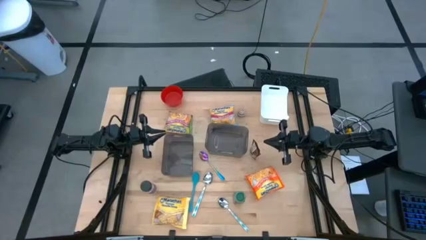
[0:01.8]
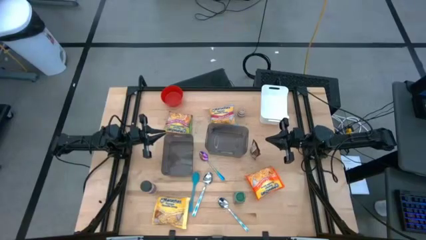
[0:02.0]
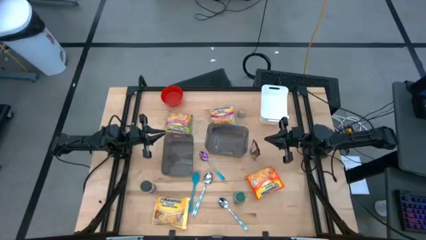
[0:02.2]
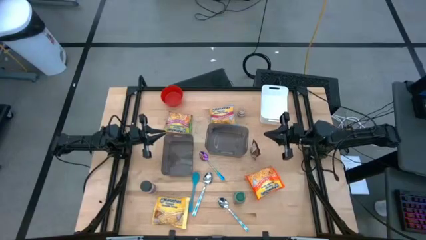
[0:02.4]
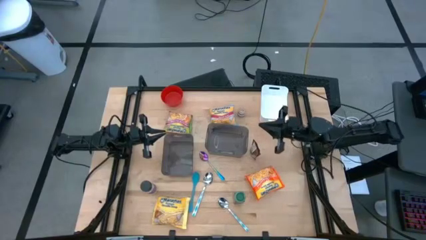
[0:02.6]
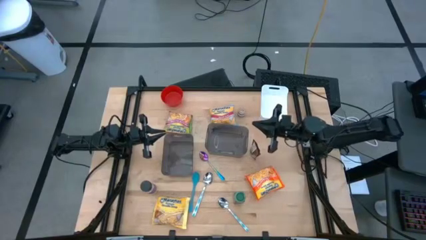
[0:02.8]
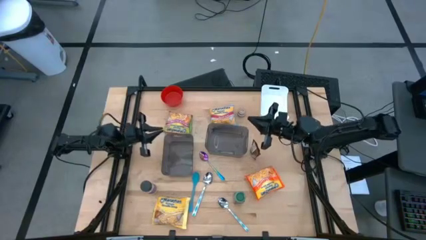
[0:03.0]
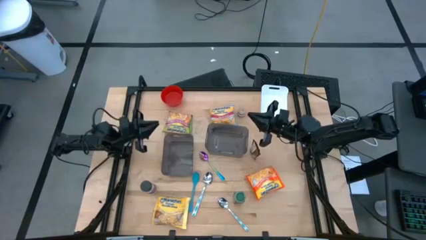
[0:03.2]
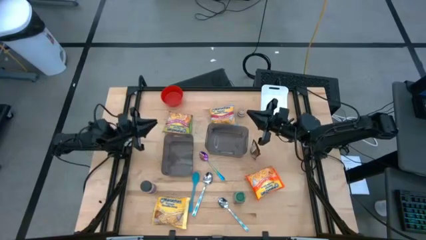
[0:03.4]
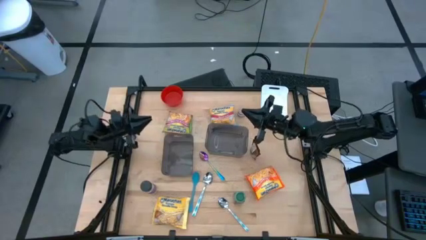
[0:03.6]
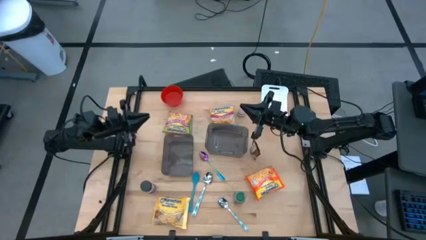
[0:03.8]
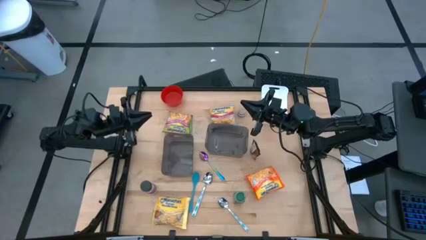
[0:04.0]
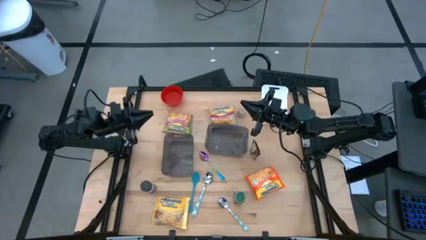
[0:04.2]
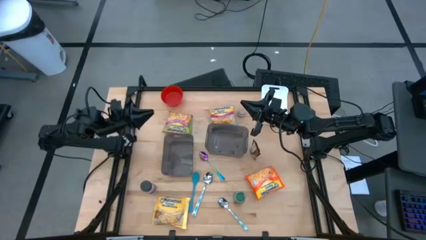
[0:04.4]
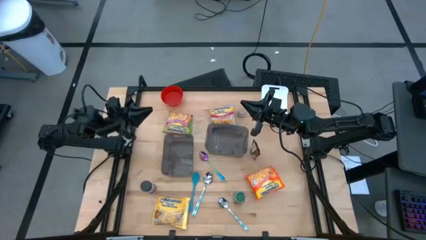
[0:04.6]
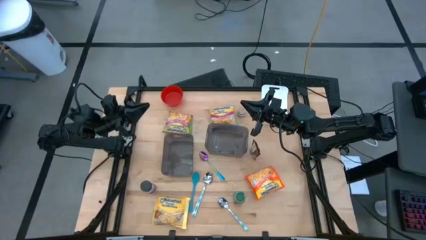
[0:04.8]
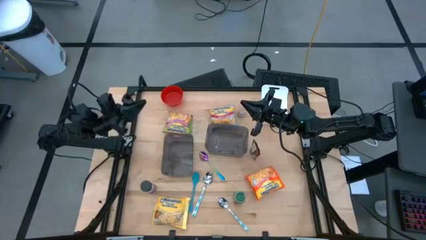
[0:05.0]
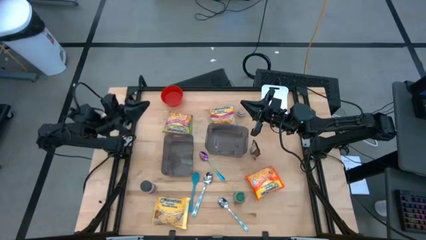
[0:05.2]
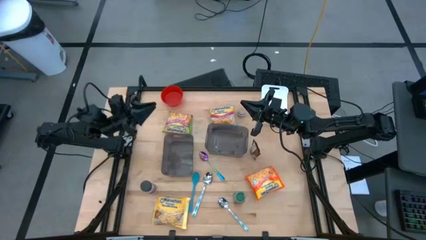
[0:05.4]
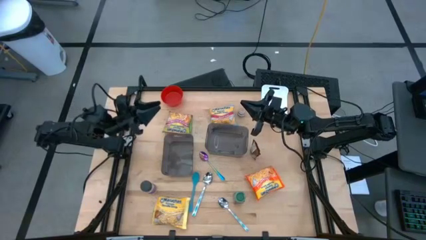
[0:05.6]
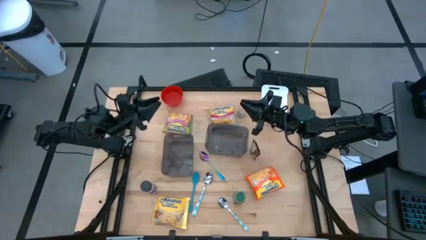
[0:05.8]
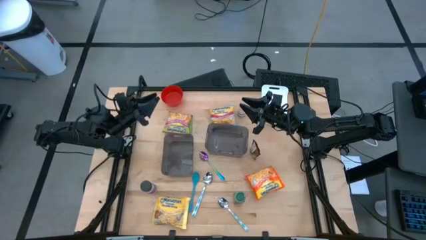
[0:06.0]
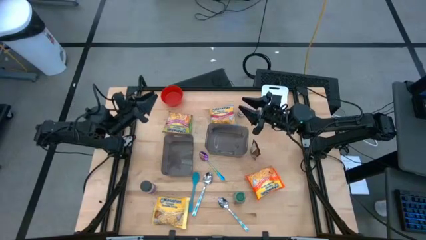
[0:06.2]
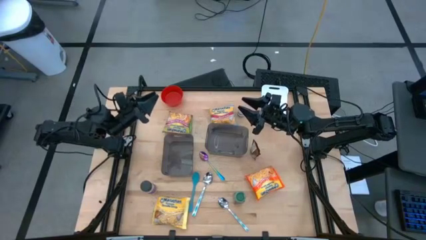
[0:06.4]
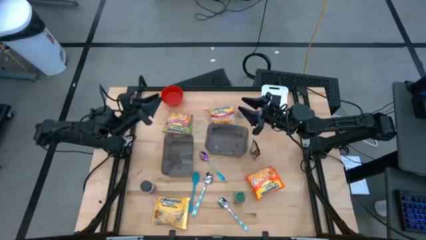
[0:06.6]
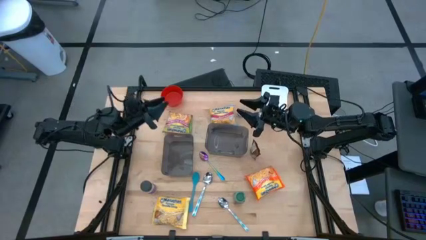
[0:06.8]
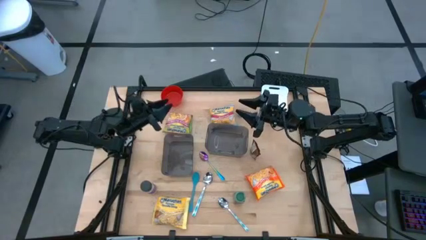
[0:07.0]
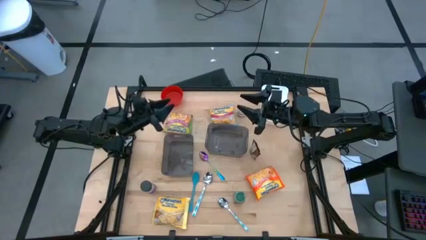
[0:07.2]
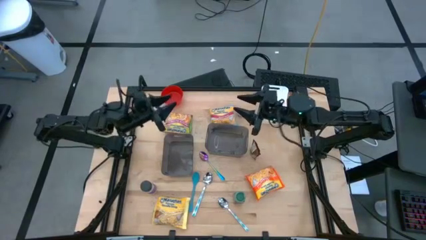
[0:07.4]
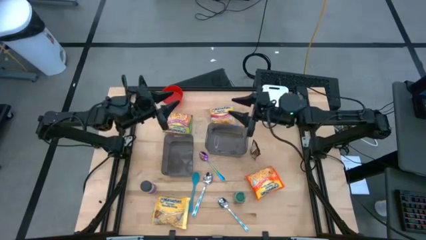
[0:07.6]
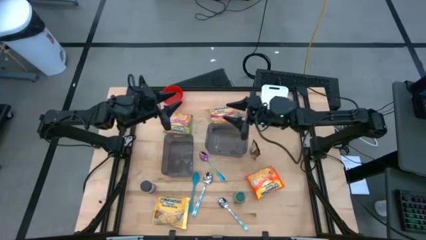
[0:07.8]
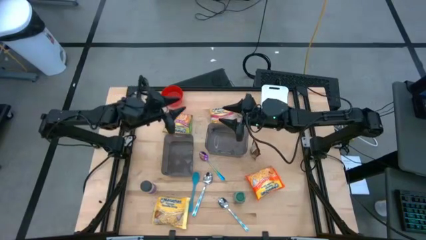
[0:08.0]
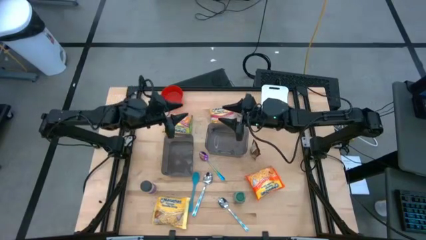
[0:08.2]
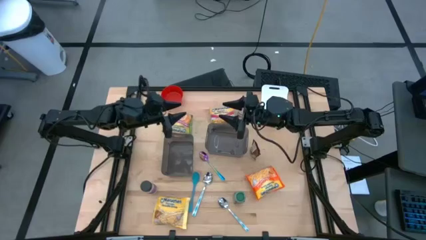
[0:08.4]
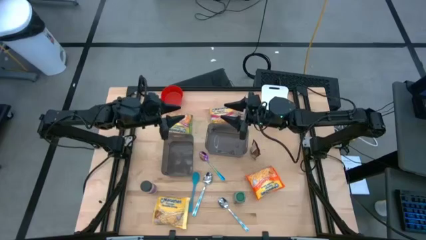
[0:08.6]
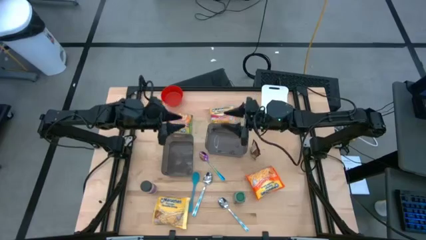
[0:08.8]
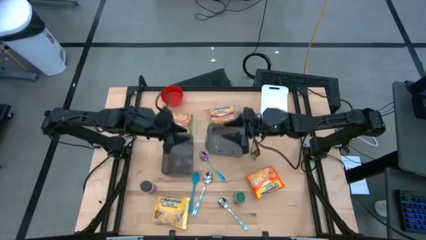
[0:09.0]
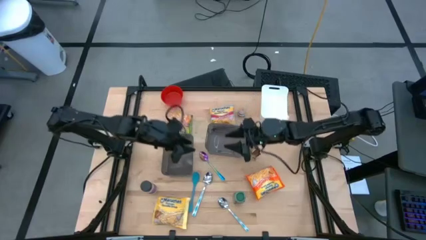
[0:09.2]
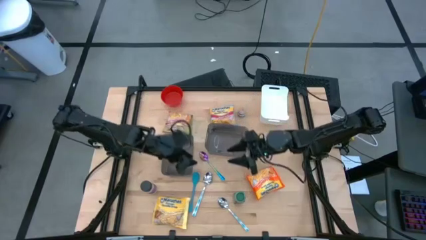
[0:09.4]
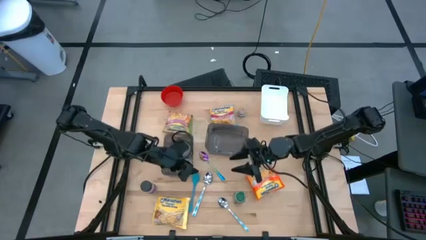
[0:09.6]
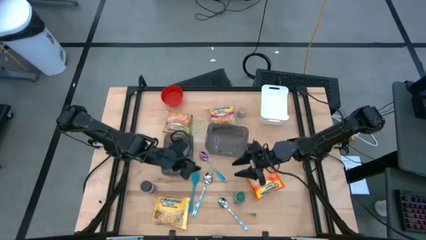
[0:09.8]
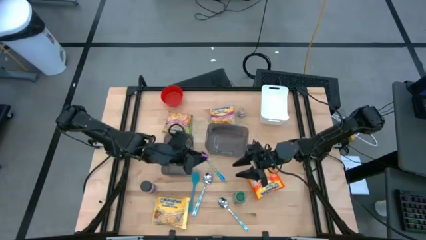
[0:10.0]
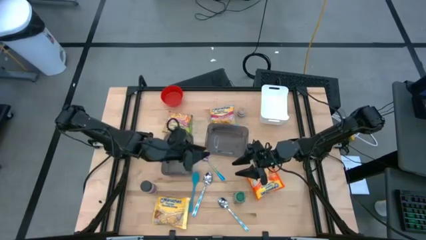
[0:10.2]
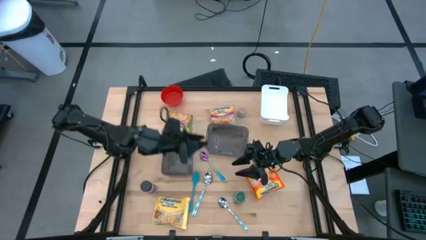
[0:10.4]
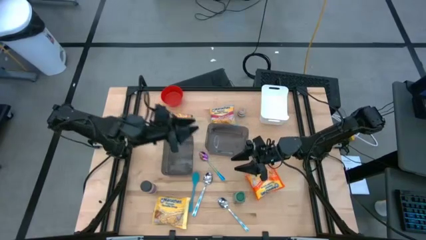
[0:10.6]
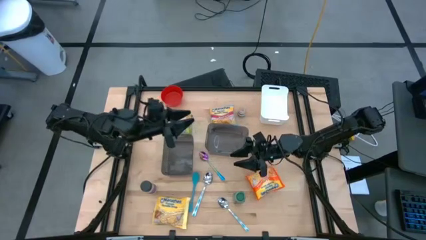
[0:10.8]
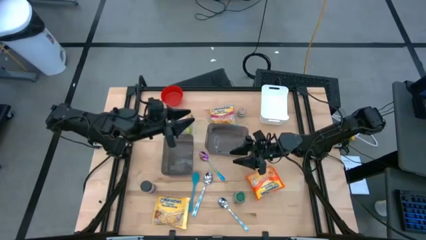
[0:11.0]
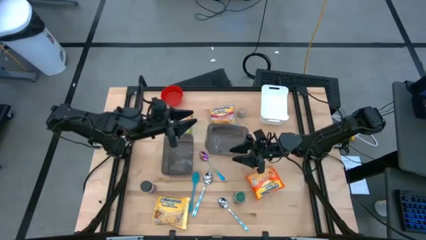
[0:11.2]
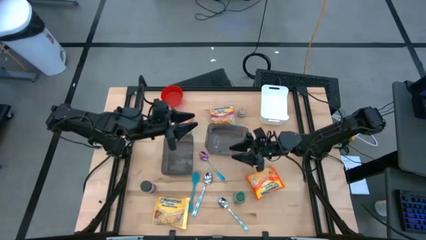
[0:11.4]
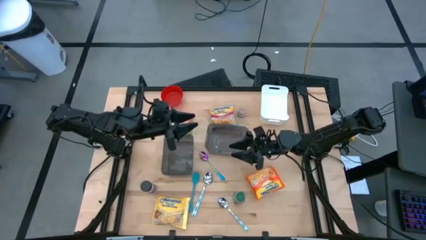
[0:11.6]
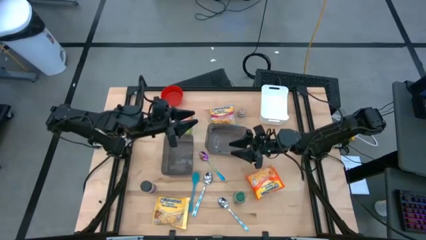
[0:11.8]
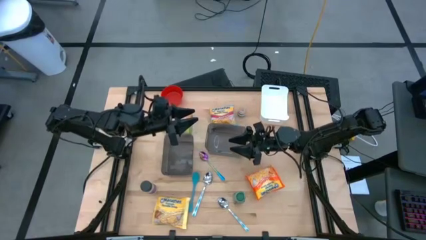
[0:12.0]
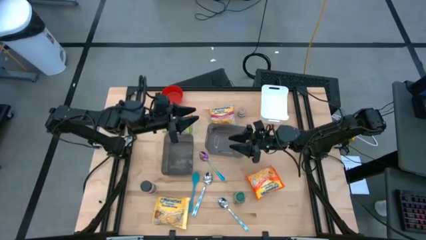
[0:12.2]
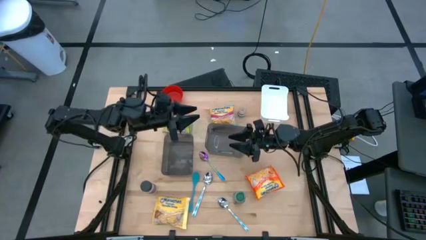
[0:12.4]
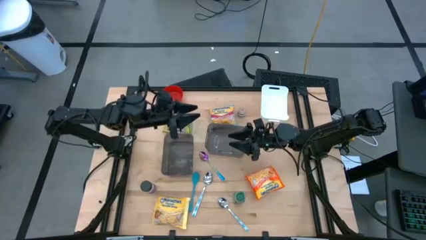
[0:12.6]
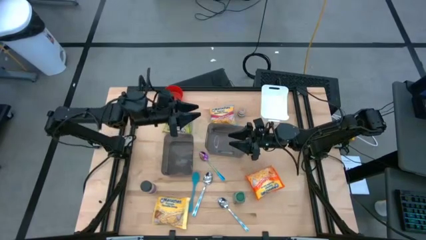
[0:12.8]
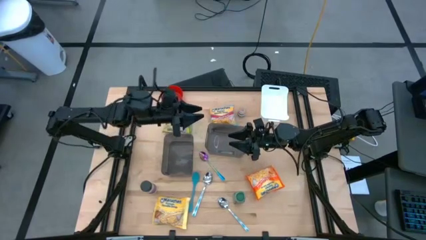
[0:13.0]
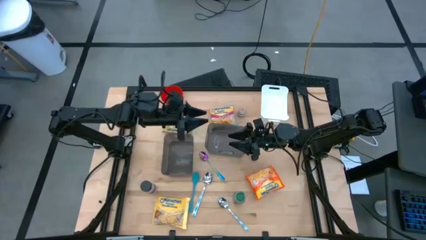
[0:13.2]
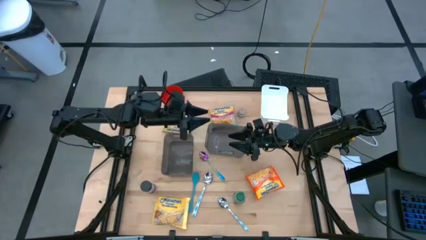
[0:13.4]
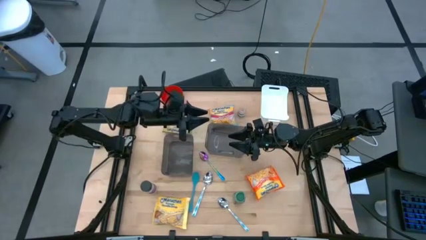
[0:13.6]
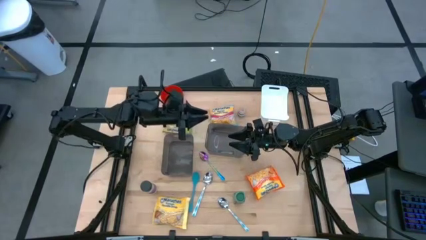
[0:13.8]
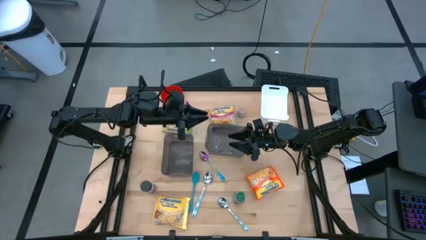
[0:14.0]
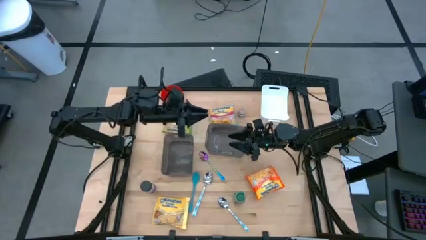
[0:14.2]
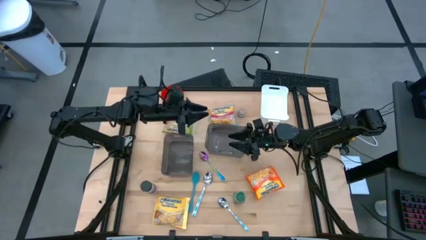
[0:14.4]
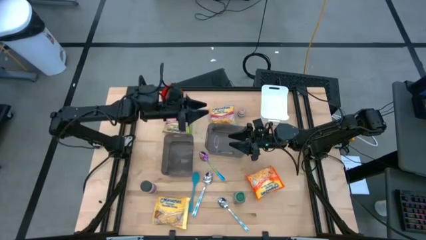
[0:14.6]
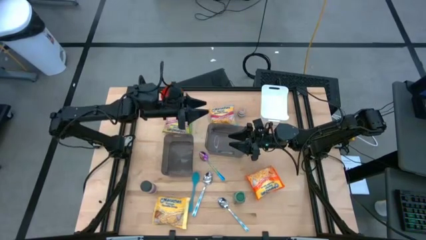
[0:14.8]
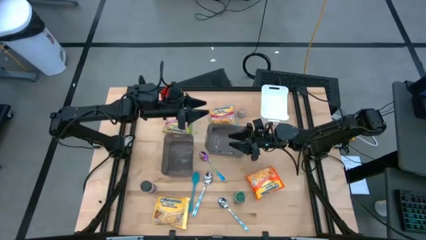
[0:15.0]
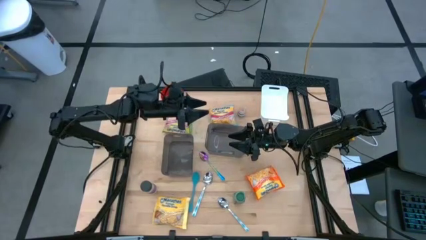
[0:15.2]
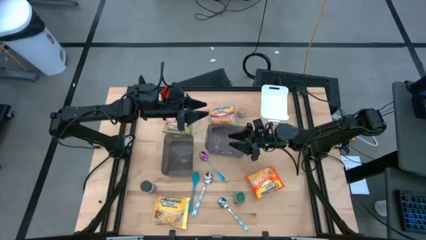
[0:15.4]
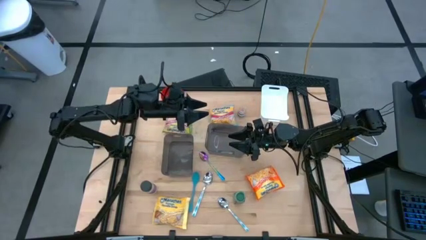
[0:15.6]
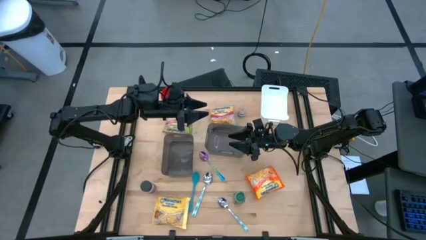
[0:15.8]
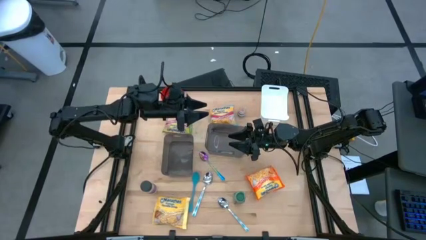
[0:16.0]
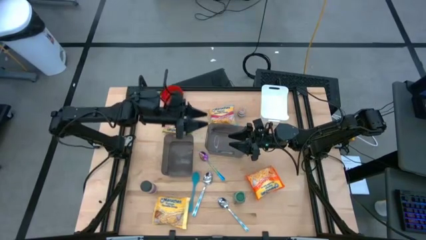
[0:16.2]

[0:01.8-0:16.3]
Task: Pick & Place Food Item
Put the top blue patterned spoon into the white bin
